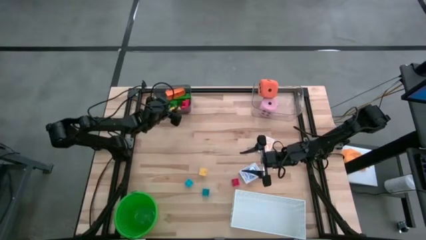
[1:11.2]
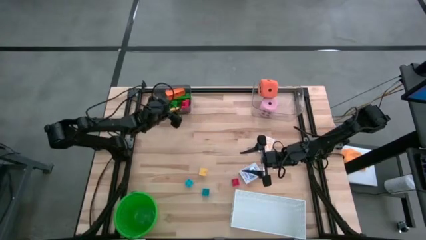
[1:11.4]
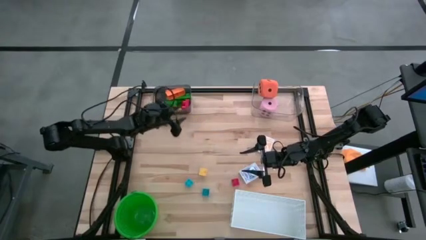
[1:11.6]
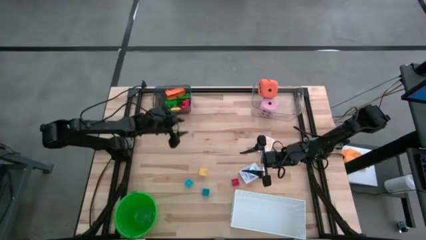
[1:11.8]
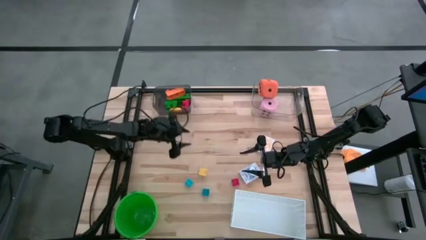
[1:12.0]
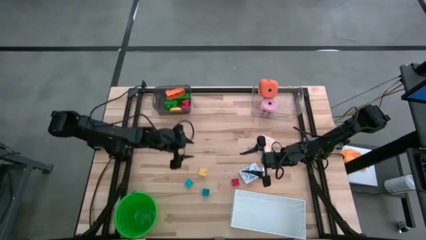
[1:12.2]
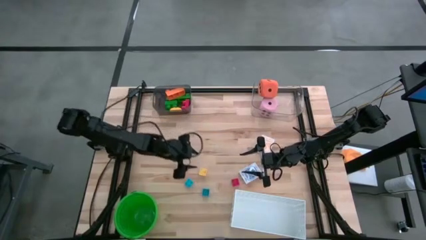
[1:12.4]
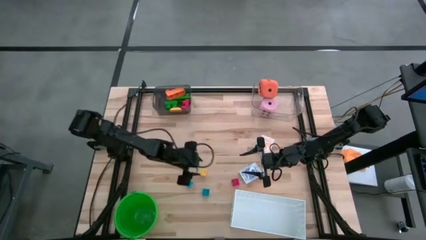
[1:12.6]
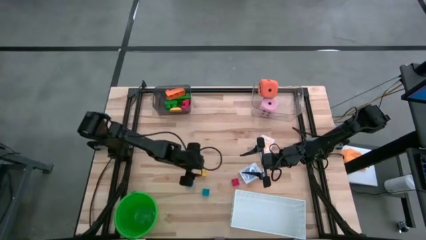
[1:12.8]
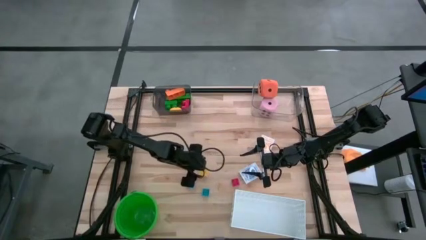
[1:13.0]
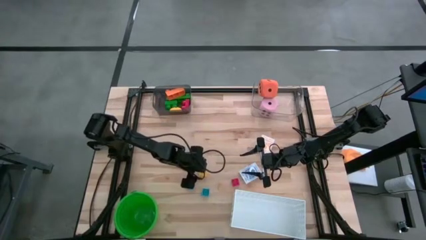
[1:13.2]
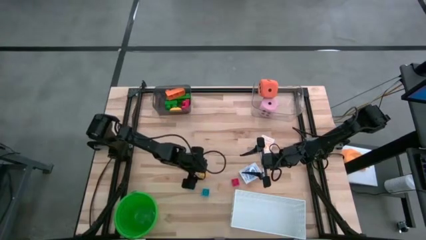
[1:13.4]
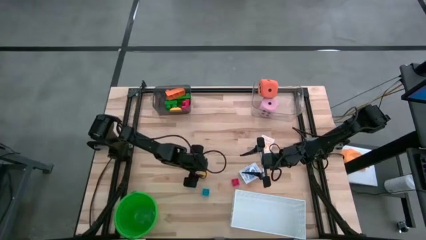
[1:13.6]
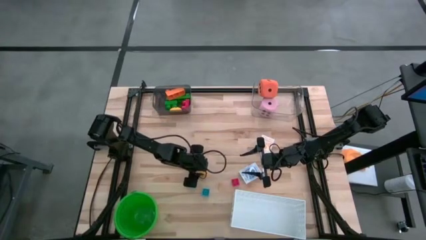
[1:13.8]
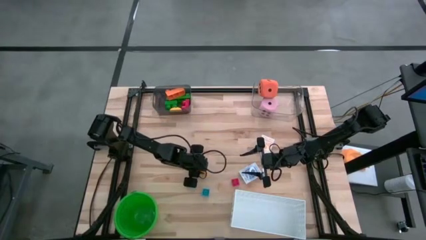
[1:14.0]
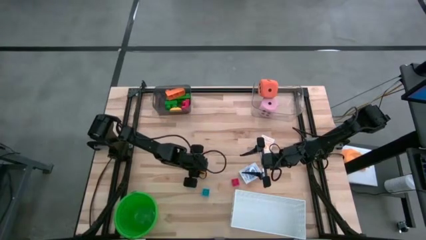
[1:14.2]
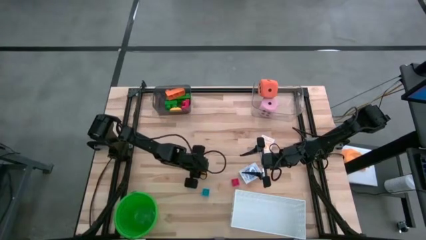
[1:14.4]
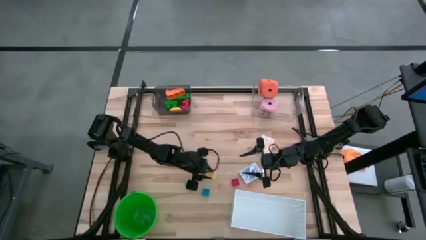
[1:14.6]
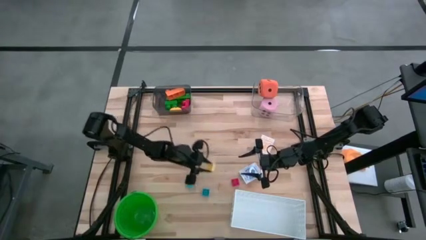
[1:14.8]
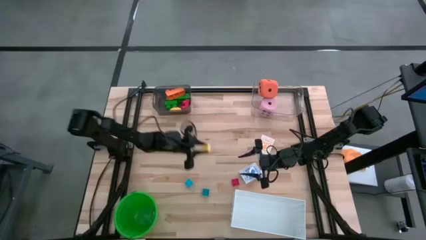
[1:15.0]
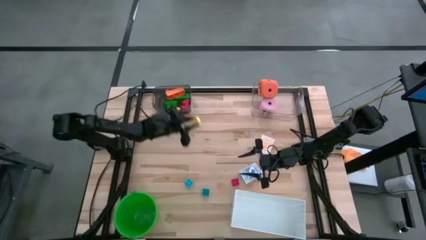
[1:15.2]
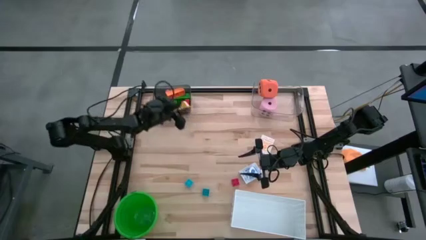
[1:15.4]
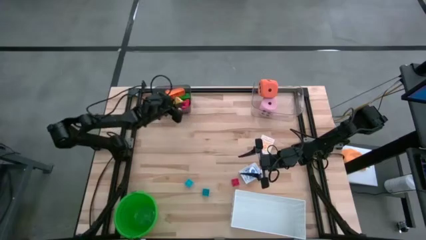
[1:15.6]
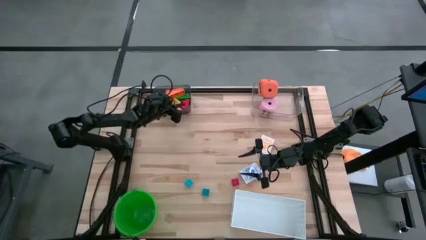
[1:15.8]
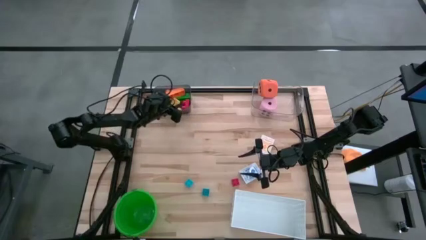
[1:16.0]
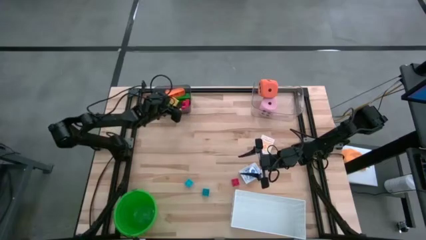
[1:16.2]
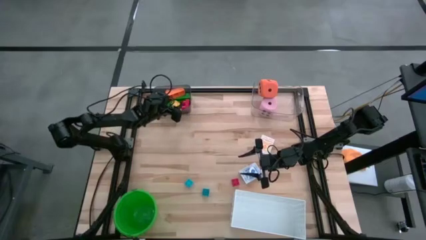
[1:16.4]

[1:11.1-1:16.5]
Task: Pick & Place Toys
Put the light yellow game piece into the black bin

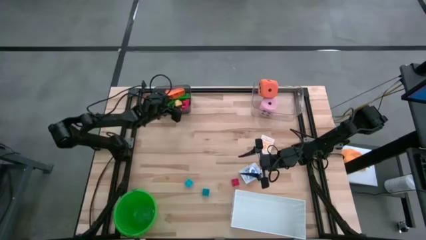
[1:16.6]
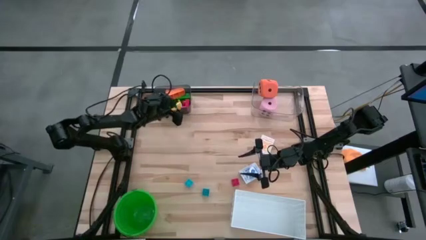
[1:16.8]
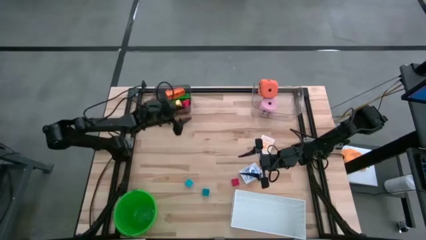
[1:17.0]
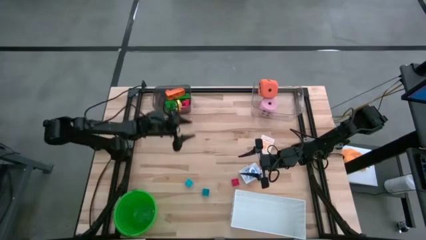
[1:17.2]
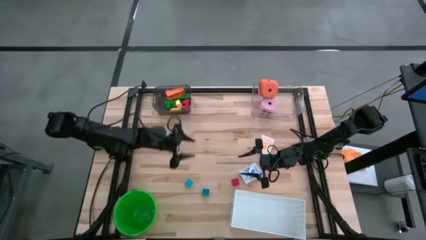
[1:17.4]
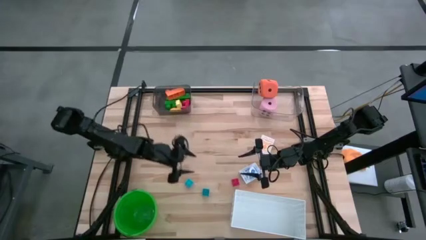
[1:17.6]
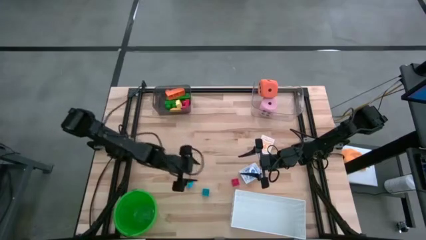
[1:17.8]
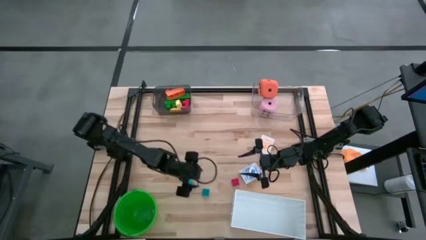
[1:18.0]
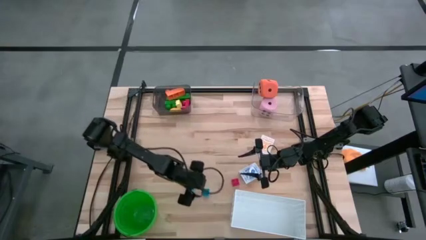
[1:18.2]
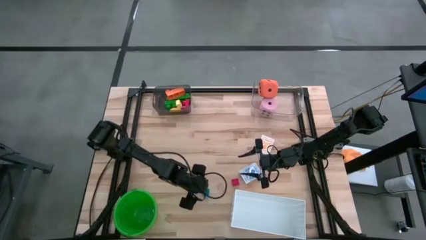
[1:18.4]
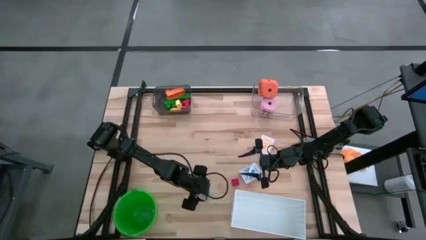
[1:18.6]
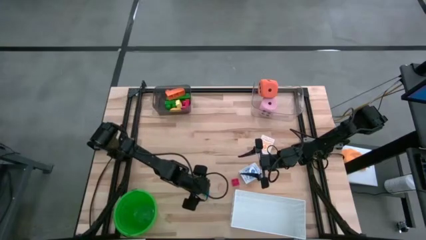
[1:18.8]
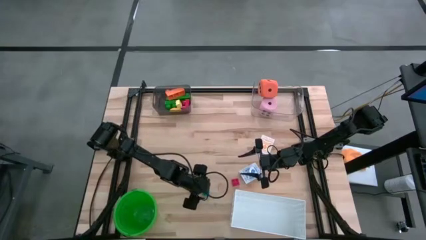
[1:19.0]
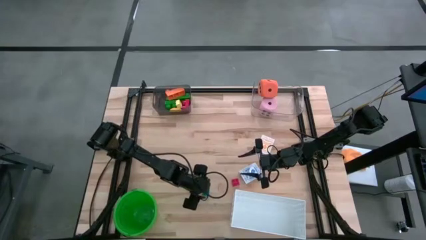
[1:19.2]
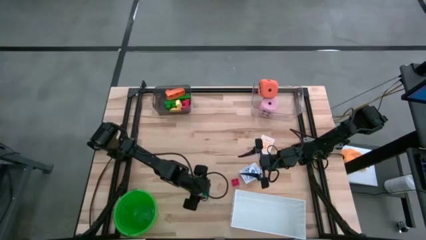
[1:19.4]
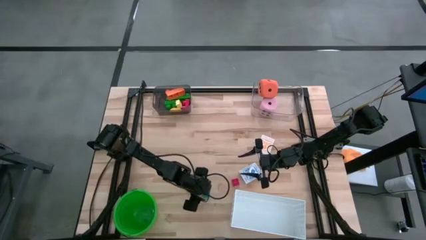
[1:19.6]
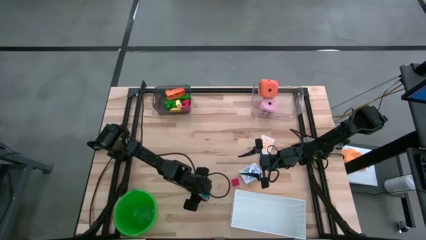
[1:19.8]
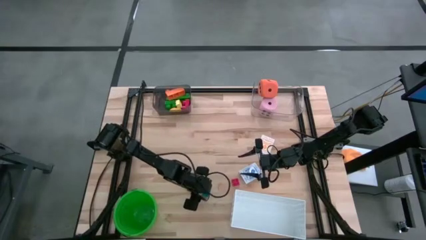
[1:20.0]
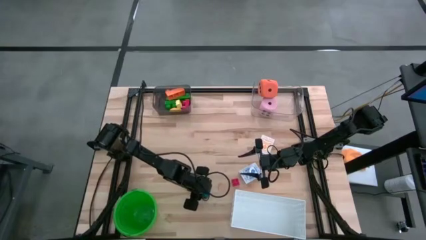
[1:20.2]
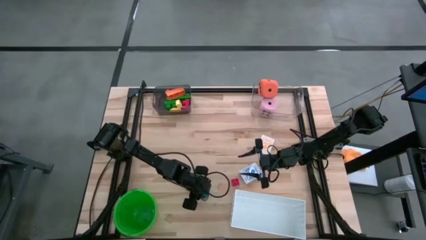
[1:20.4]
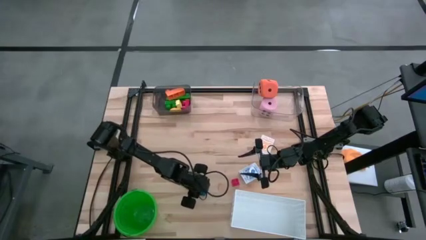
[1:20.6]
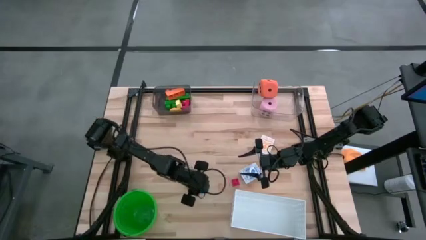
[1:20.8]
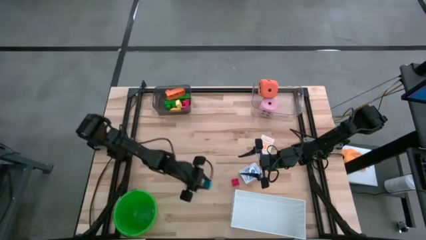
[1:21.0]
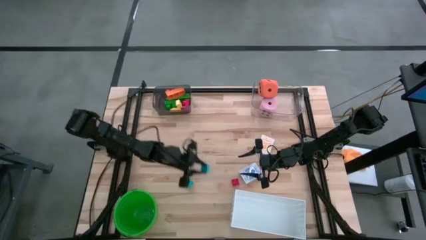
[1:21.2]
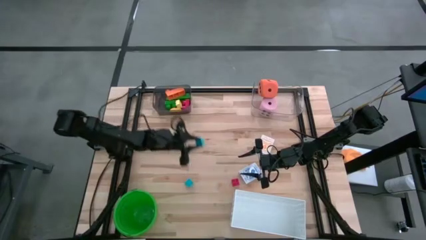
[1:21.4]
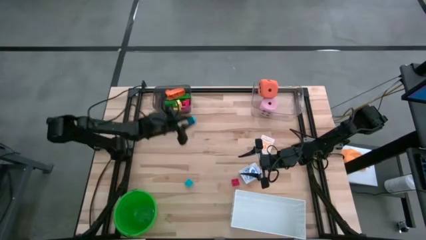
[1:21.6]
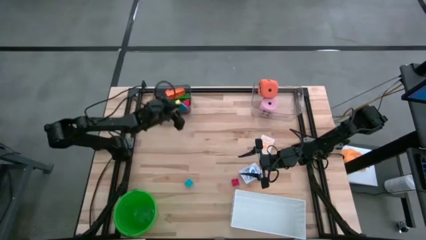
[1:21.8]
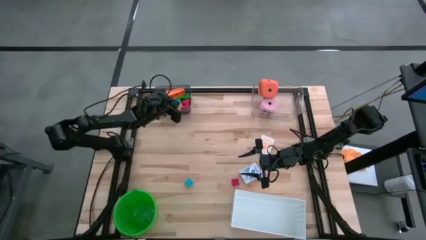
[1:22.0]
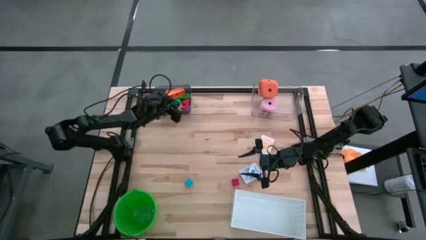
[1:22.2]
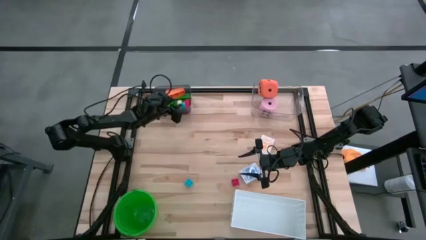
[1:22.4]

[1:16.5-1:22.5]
Put the blue game piece into the black bin

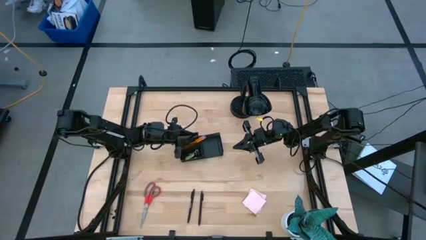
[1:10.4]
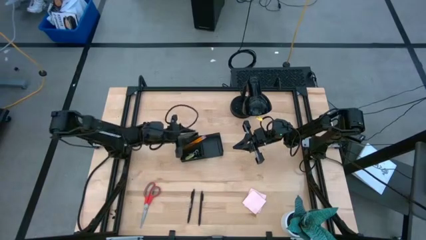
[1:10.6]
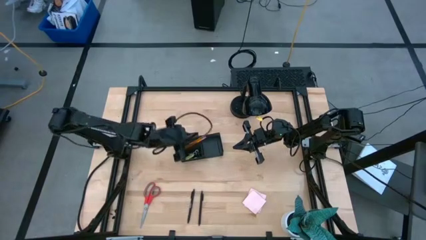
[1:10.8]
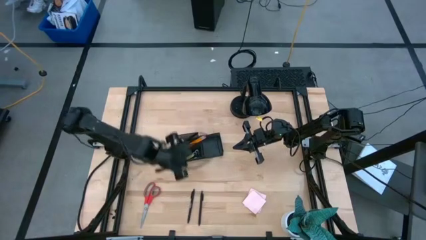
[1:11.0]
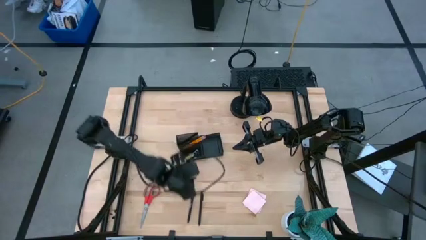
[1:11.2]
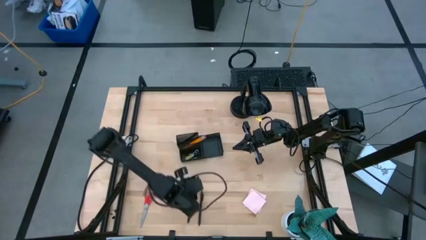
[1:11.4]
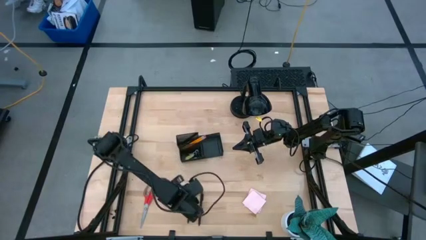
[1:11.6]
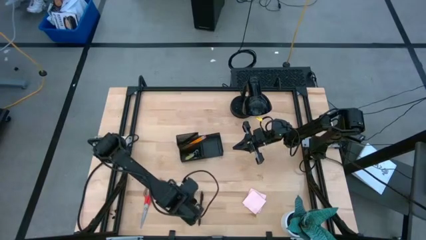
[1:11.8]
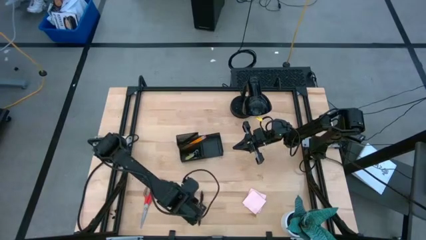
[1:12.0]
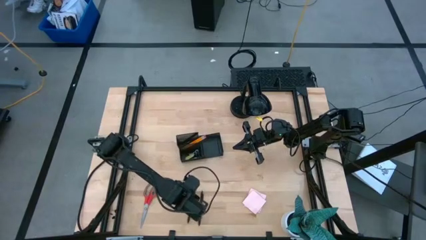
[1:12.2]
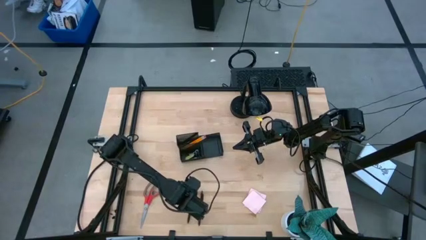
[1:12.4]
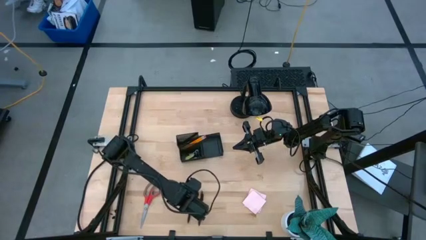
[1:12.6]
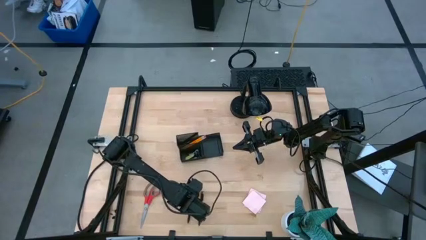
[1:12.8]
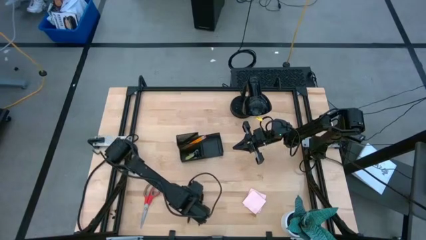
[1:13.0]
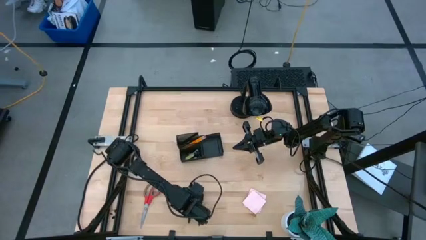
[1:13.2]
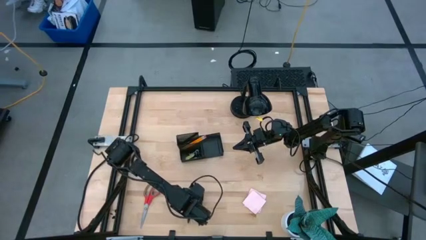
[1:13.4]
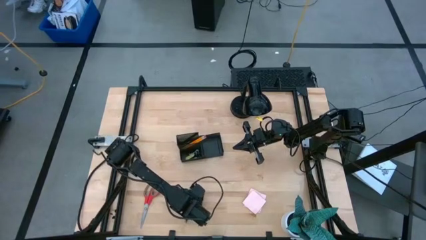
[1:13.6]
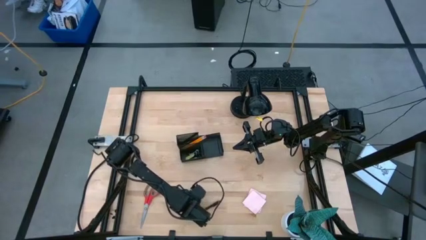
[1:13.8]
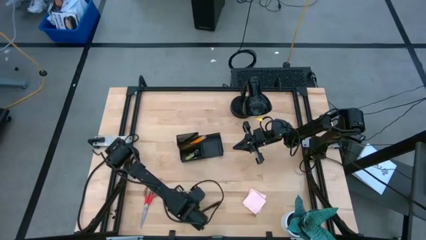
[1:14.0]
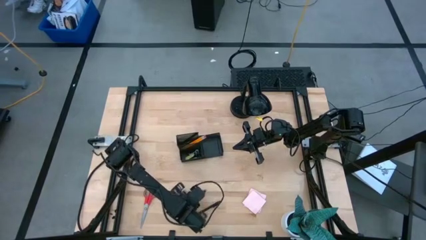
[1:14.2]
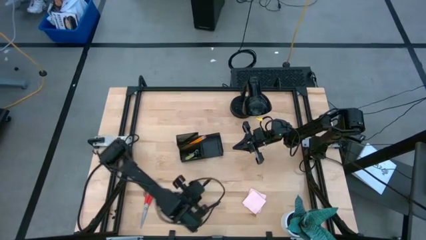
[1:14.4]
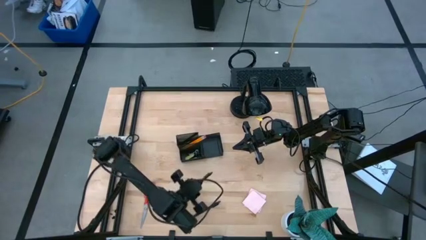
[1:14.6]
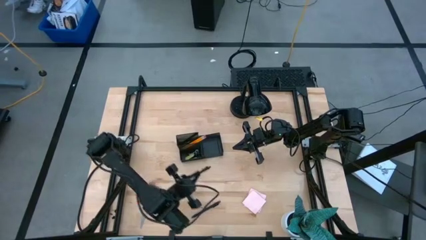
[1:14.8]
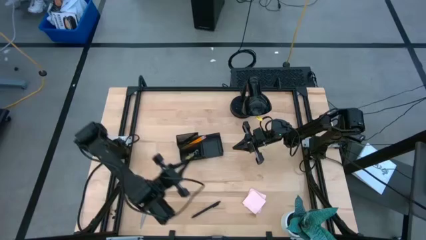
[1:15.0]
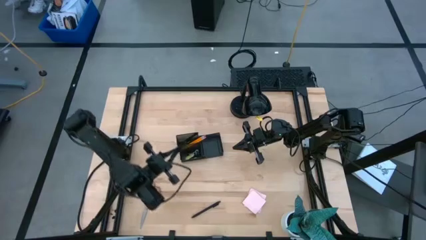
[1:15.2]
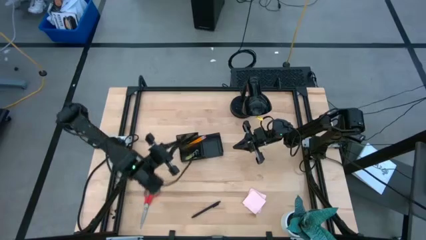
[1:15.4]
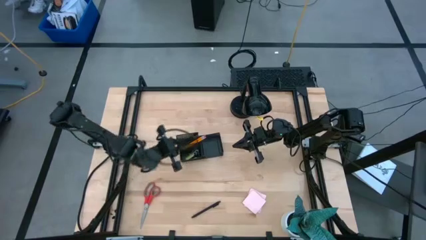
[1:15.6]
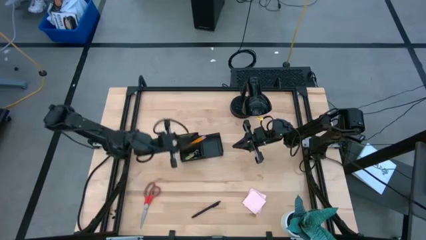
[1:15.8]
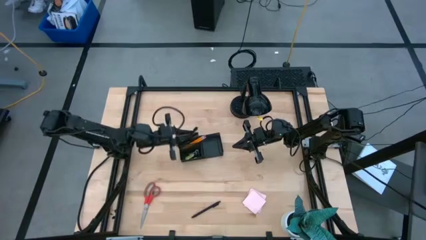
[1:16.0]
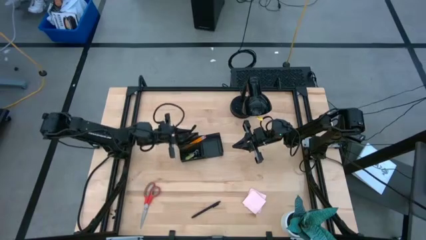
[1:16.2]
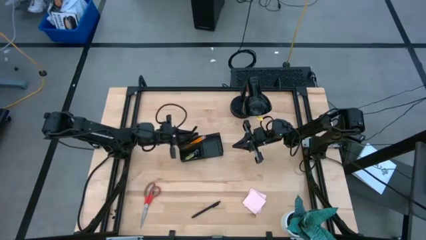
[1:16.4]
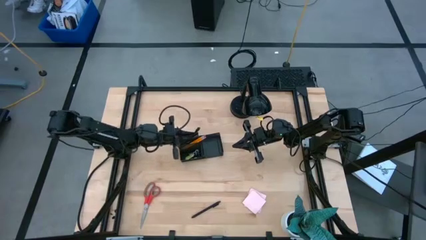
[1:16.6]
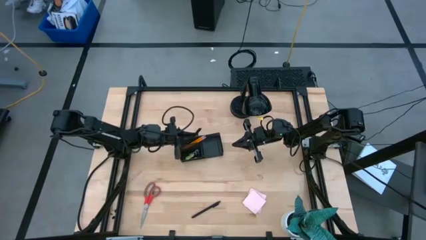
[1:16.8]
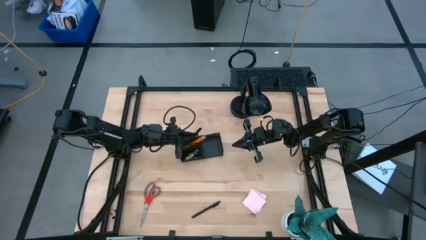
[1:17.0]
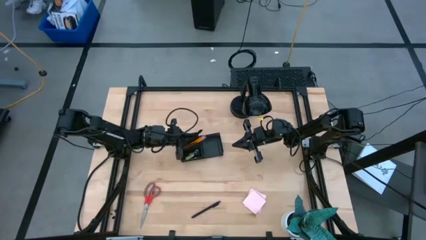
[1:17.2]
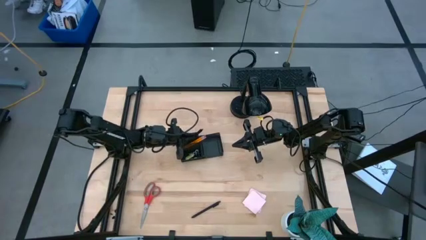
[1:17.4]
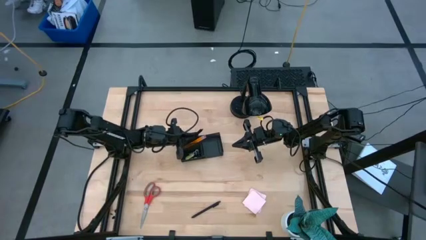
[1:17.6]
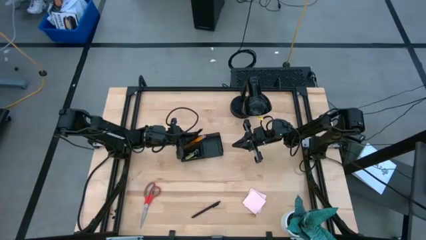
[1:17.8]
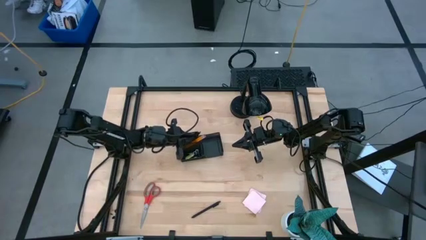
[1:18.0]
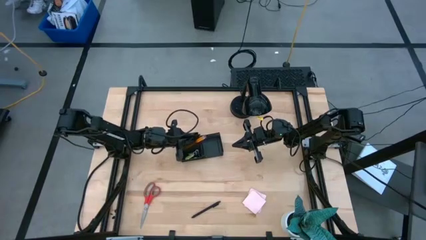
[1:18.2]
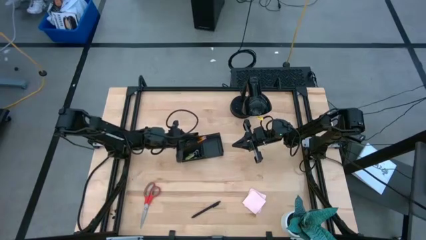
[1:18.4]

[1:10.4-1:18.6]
Task: Pick and place office supplies into organizer
Put the black pen into the black desk organizer
